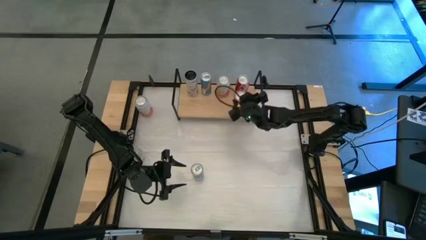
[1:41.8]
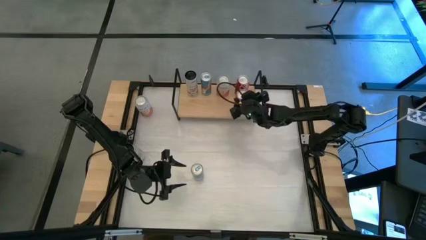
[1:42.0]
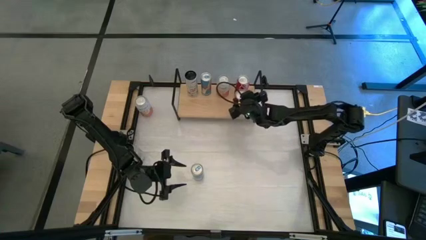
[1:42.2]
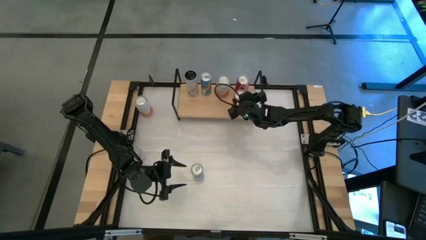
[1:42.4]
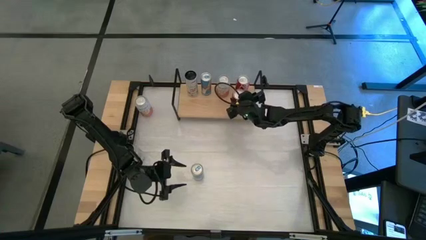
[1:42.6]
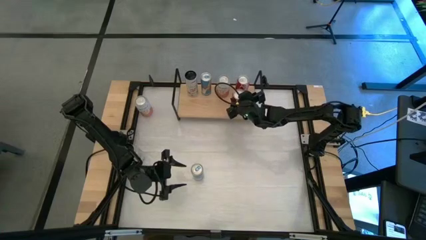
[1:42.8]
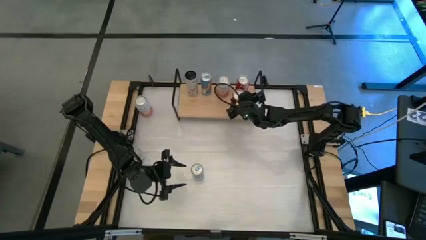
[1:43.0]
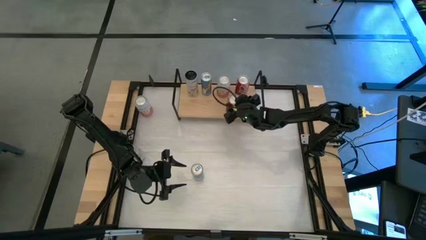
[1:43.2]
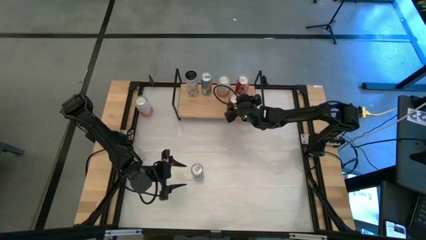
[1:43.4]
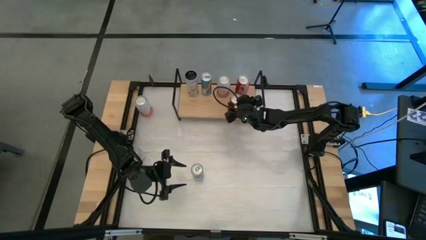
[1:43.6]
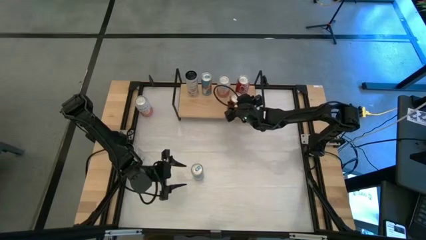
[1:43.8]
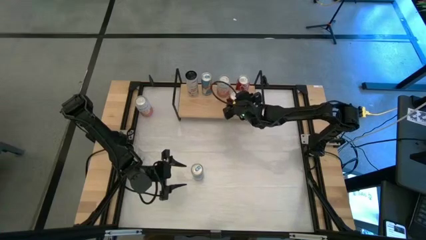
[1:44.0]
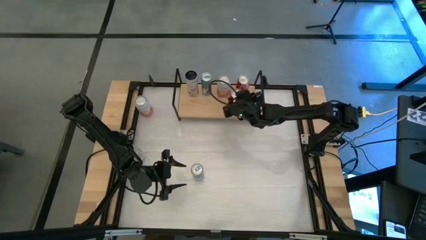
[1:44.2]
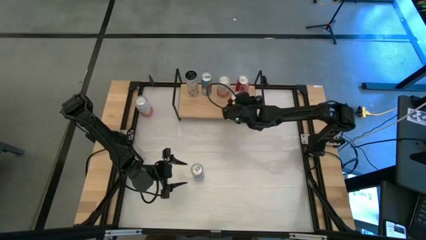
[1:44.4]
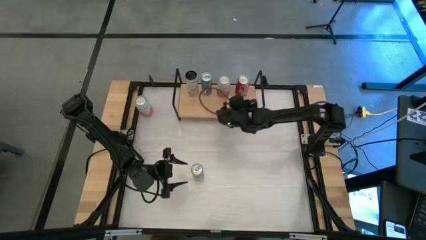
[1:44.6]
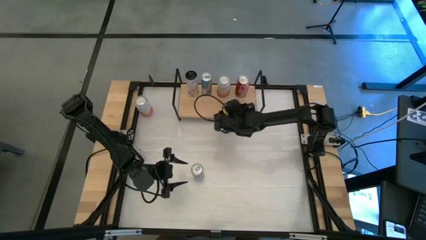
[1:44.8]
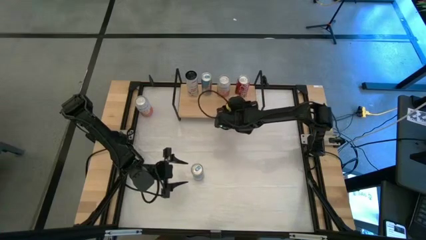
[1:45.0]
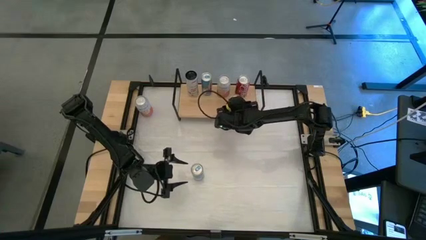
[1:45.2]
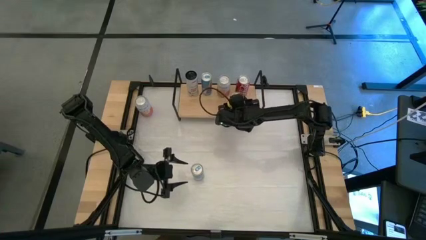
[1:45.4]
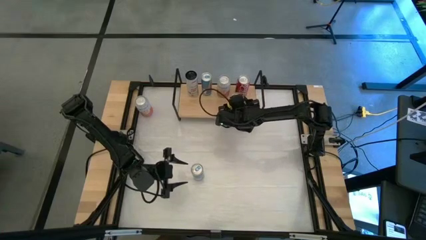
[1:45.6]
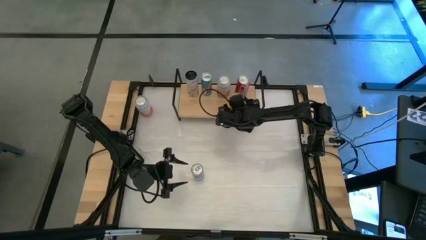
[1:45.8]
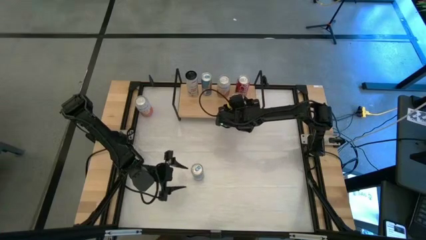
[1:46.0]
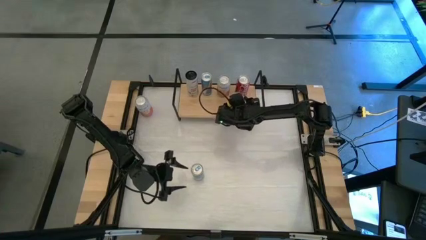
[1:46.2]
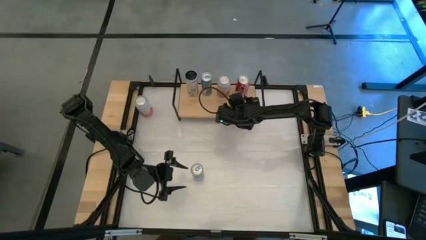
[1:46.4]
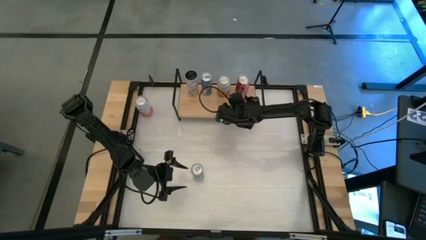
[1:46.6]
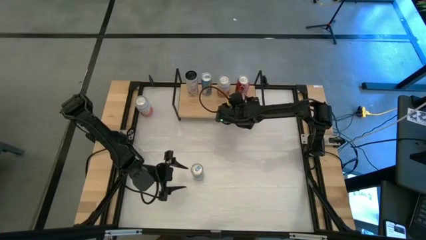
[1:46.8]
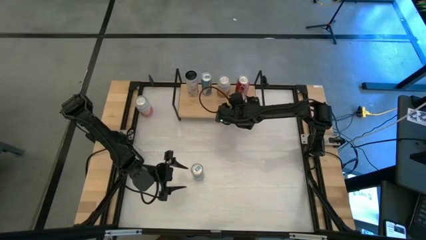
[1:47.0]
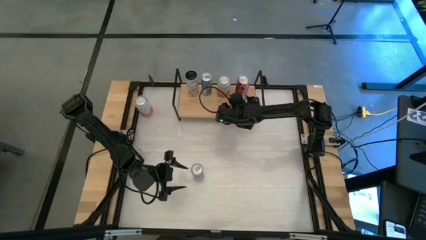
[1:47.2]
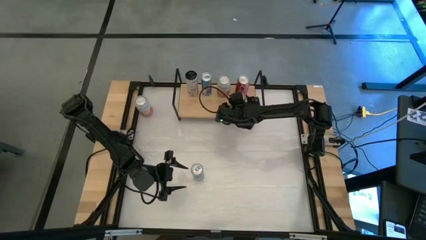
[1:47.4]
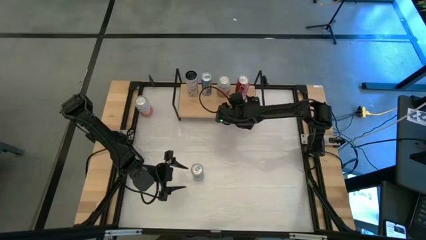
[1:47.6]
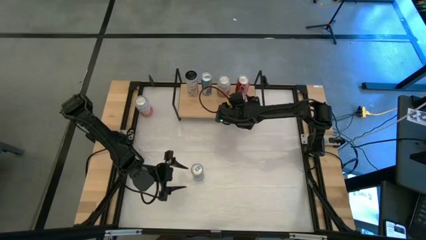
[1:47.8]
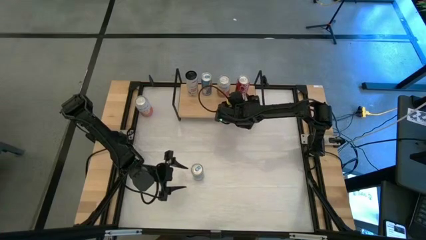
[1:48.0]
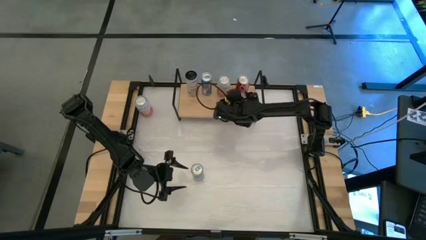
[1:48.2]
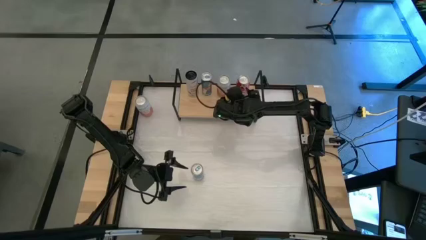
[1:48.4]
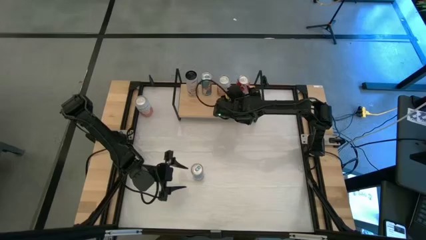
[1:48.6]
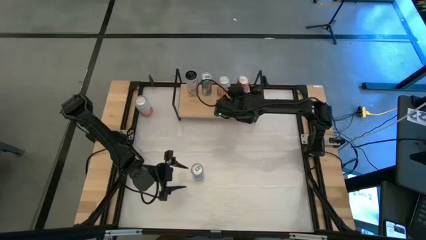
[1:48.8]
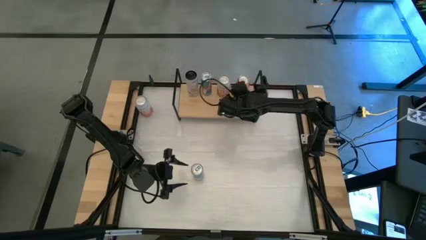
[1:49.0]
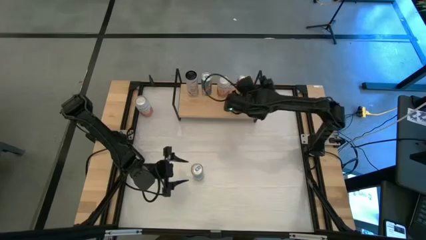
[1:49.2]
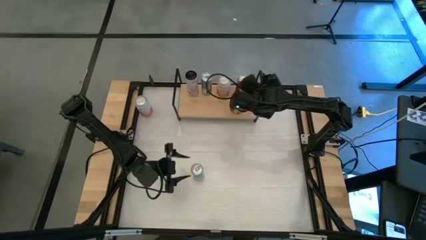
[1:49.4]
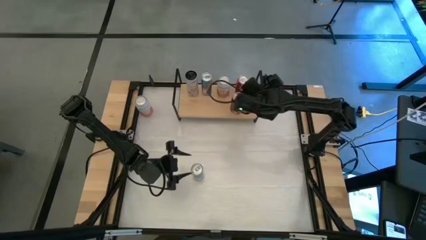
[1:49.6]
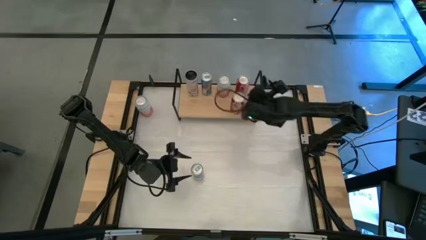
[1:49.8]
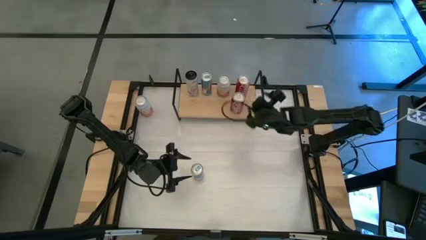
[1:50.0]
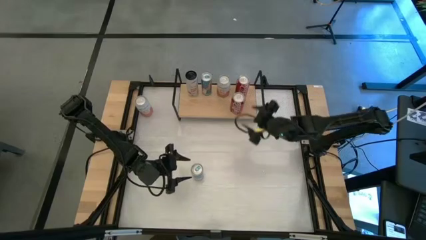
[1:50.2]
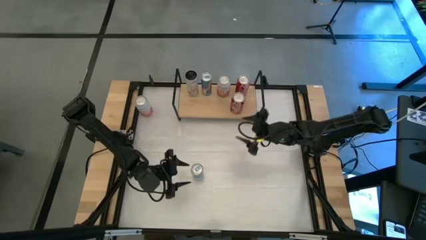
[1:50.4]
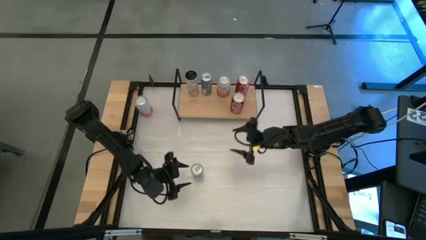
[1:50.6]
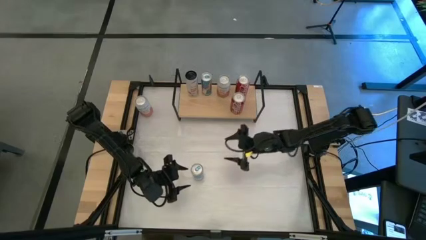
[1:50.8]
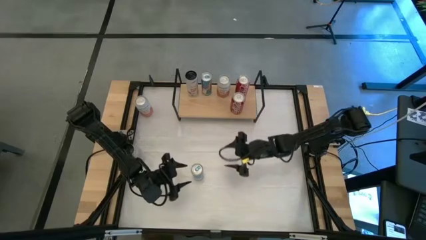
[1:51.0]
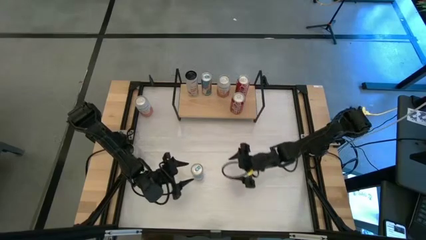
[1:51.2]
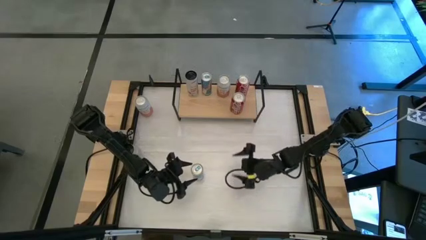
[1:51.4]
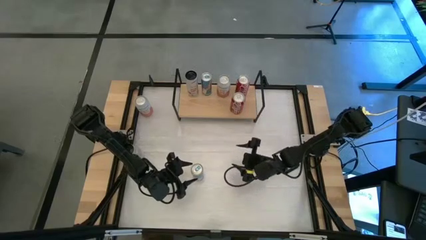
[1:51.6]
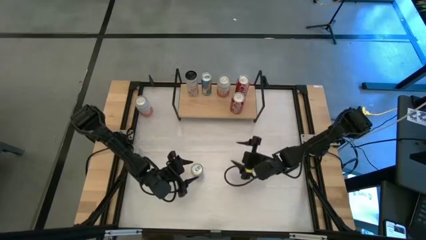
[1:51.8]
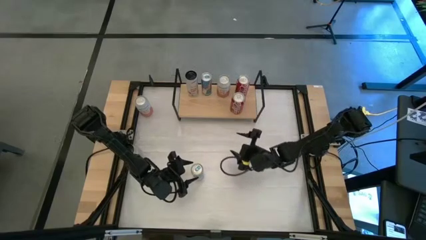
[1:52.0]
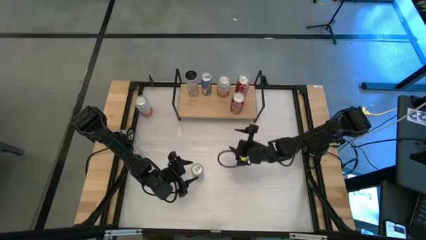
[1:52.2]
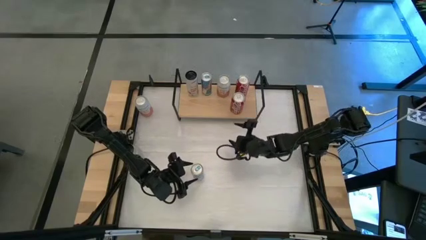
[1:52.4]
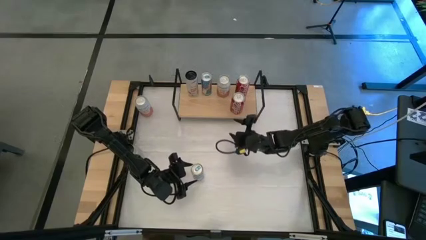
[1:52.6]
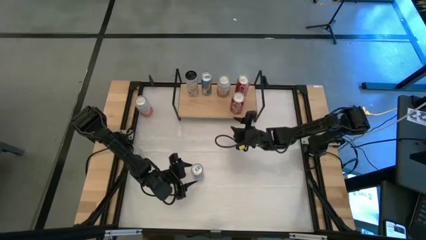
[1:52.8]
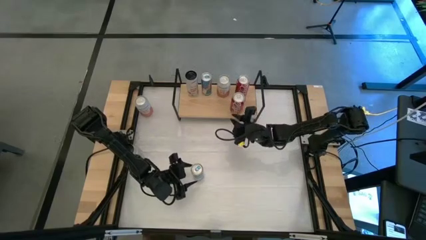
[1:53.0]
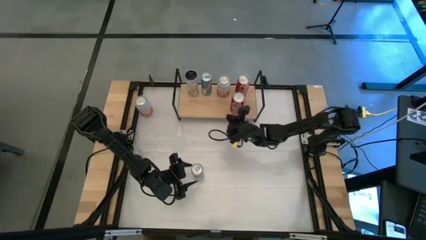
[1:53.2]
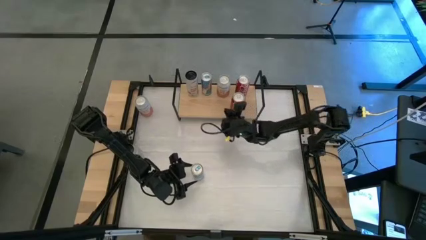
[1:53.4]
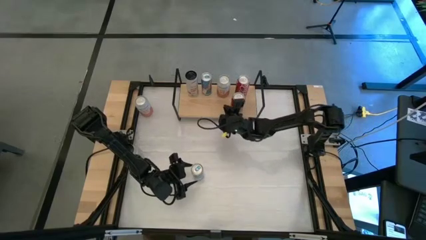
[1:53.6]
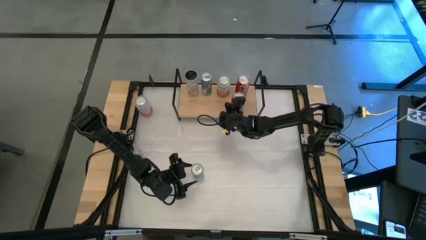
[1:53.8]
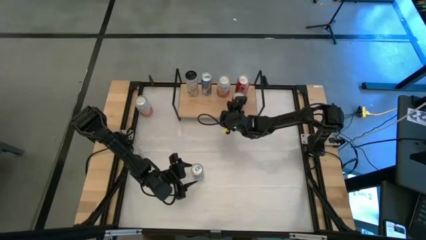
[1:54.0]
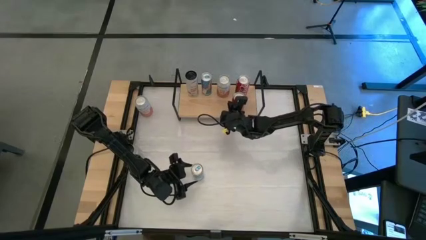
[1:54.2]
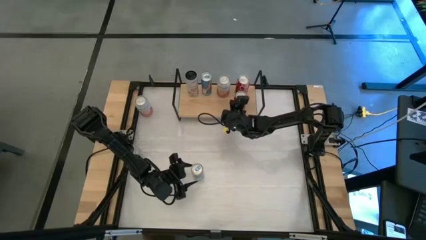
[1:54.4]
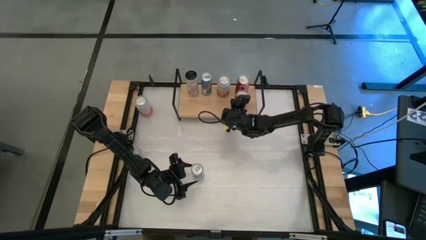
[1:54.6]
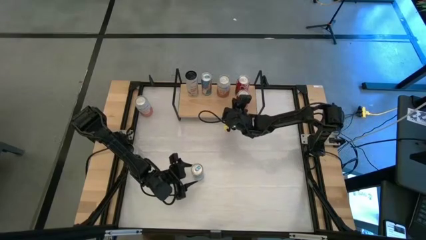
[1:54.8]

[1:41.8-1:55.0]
Task: Place canned beverage on shelf
Put the red soda can align with the other red soda can on the shelf

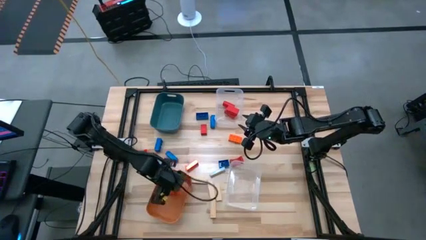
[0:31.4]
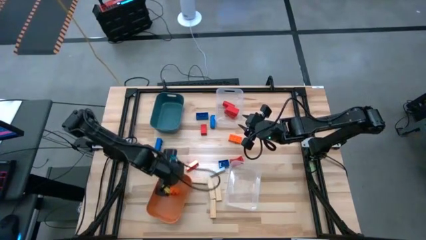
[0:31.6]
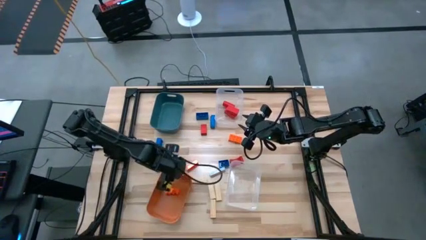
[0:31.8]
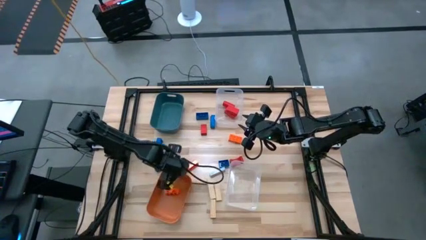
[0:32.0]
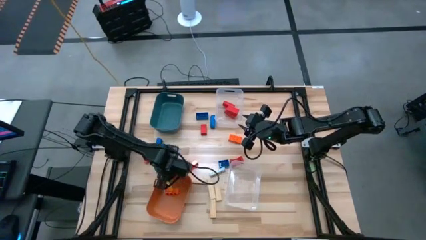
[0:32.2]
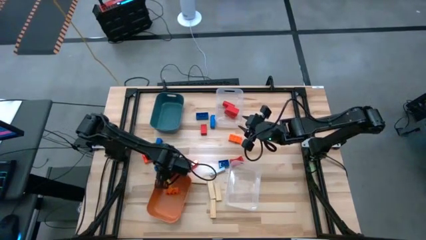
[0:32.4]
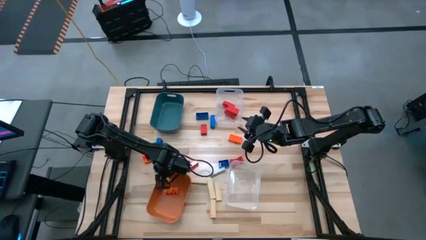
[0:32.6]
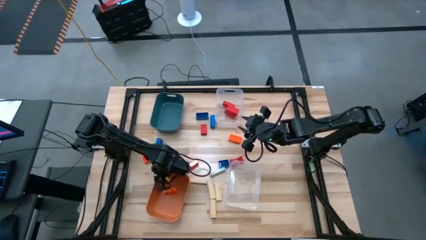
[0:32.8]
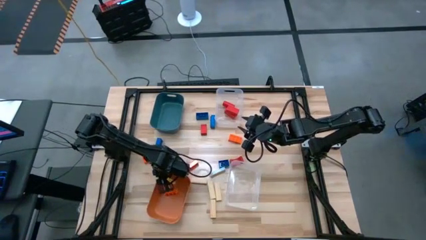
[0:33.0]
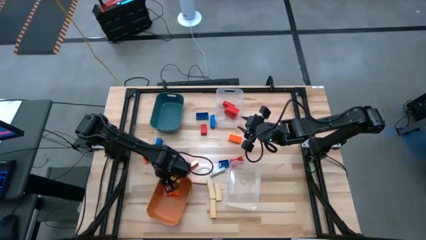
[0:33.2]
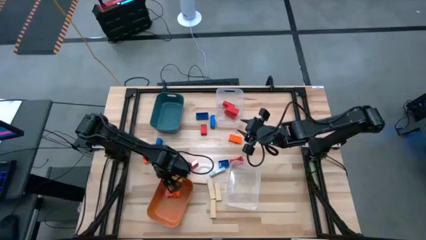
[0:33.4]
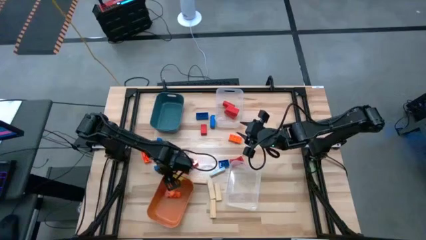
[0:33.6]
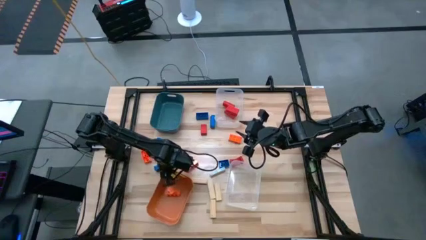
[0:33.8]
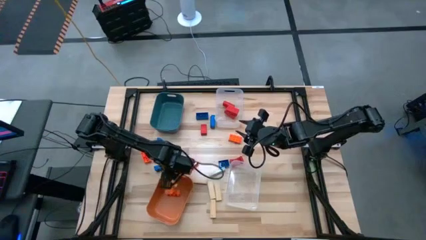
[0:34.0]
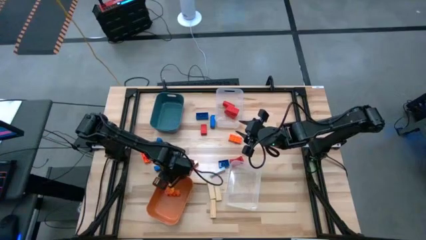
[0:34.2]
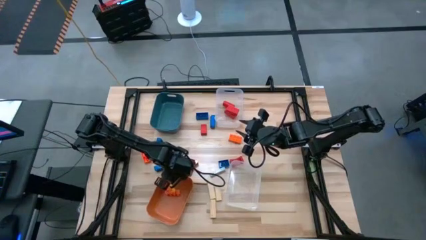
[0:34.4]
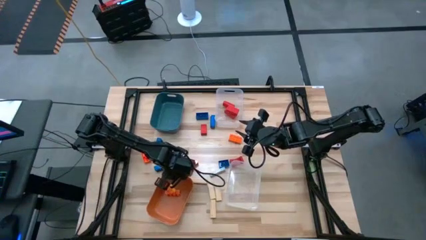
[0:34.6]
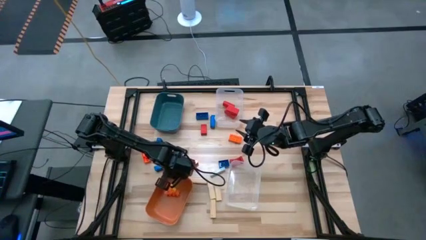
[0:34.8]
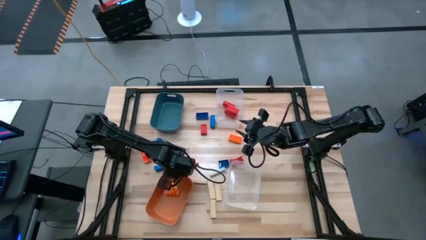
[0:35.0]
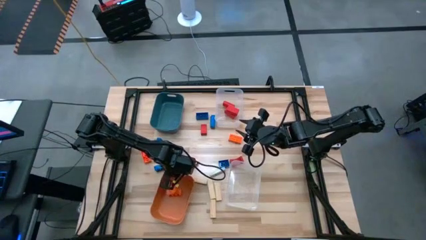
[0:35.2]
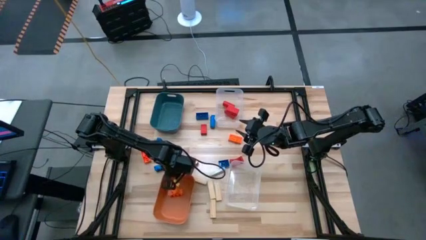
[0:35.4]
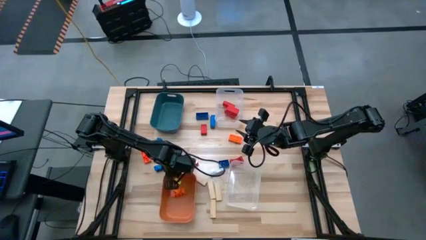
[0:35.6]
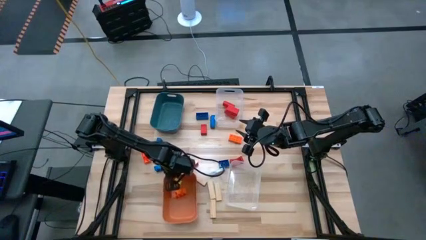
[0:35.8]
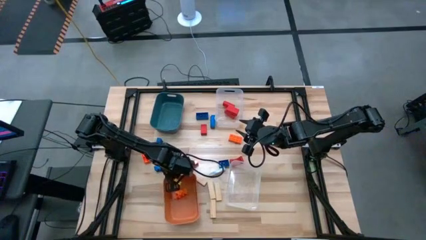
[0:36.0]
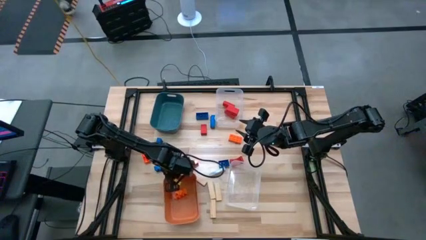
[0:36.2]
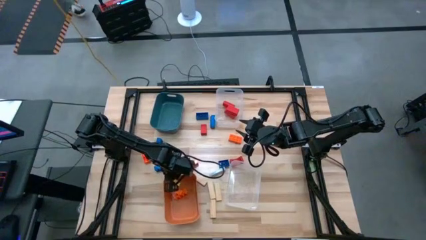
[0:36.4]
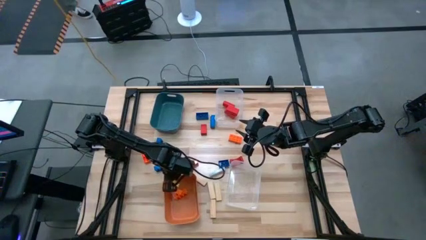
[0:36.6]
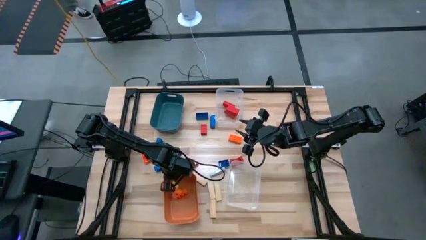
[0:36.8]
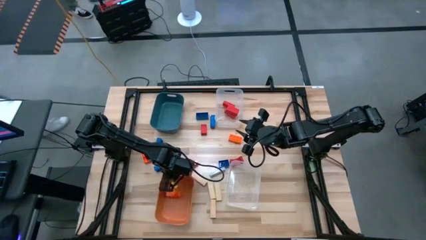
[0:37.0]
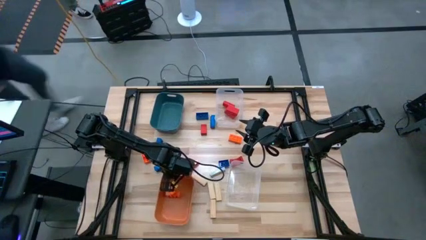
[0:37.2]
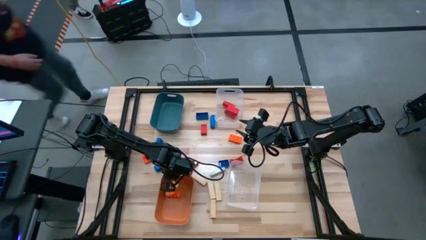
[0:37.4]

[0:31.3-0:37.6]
Task: Sort blocks
Adjust the orange bin
